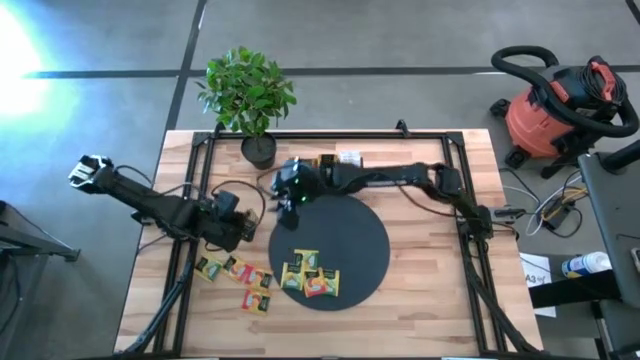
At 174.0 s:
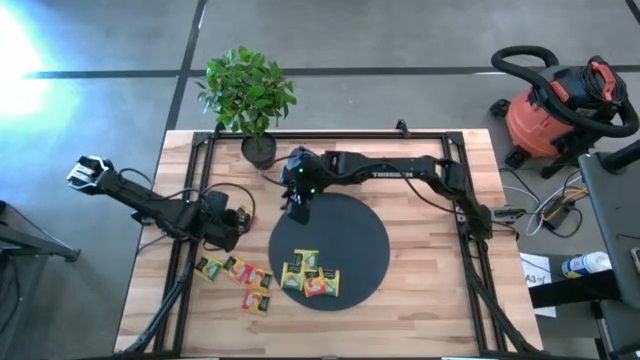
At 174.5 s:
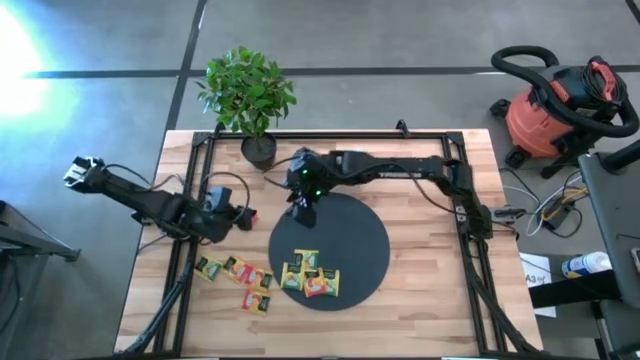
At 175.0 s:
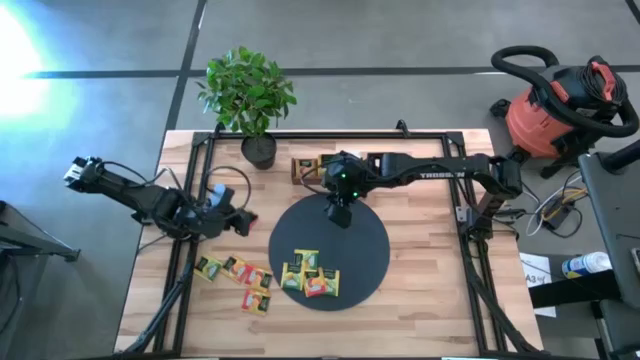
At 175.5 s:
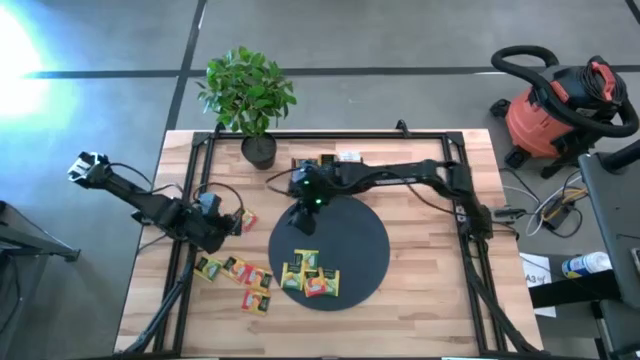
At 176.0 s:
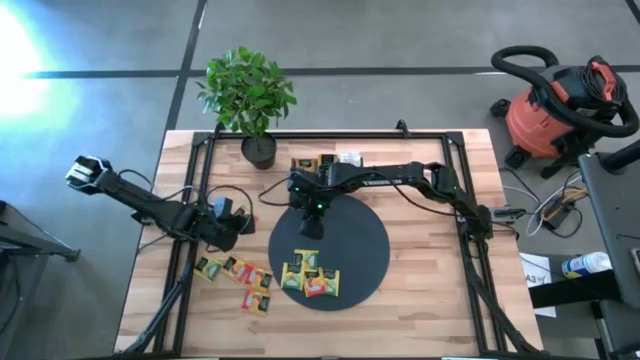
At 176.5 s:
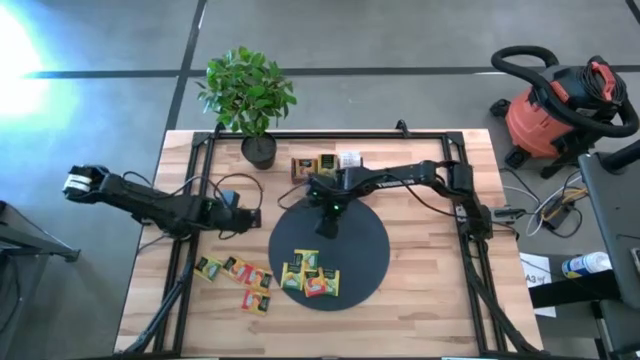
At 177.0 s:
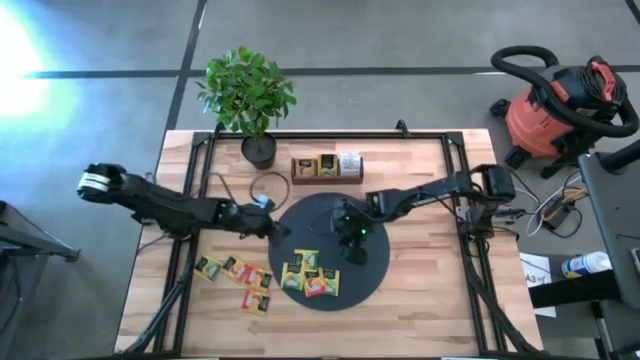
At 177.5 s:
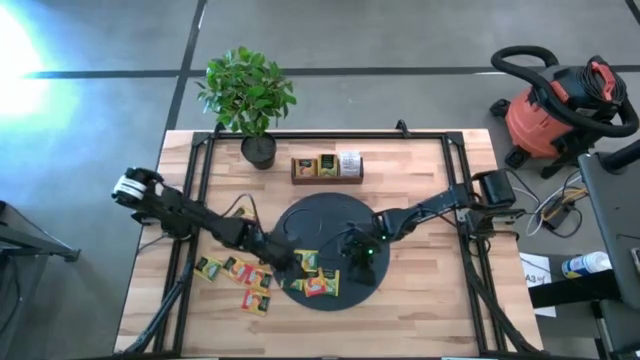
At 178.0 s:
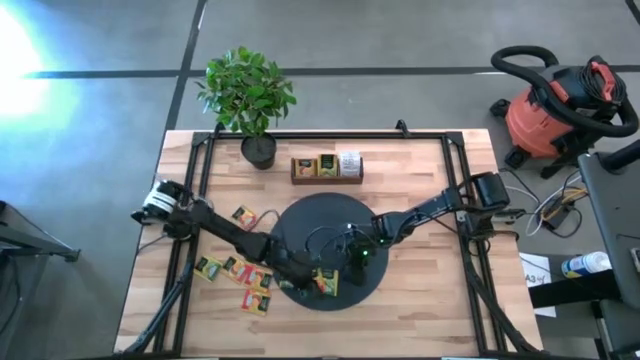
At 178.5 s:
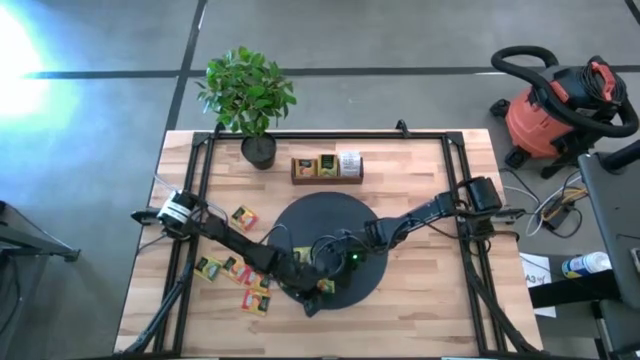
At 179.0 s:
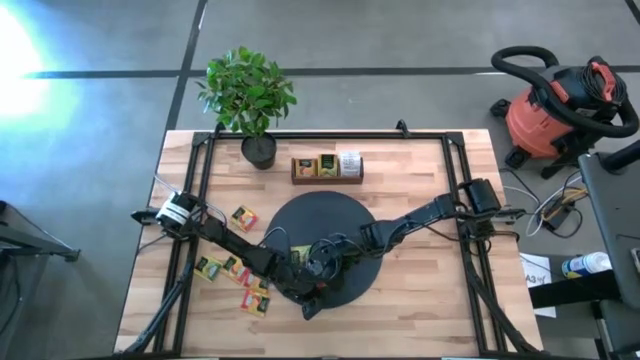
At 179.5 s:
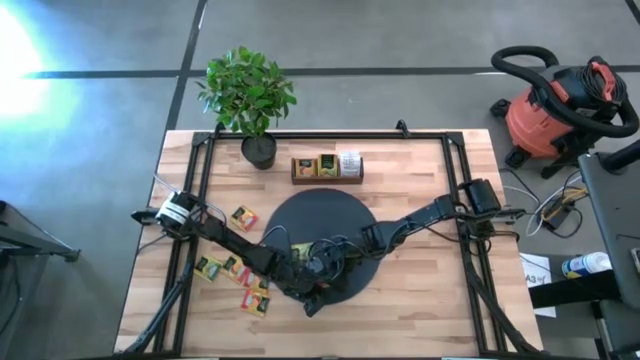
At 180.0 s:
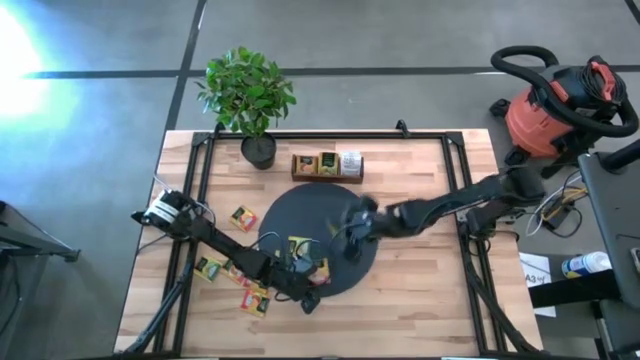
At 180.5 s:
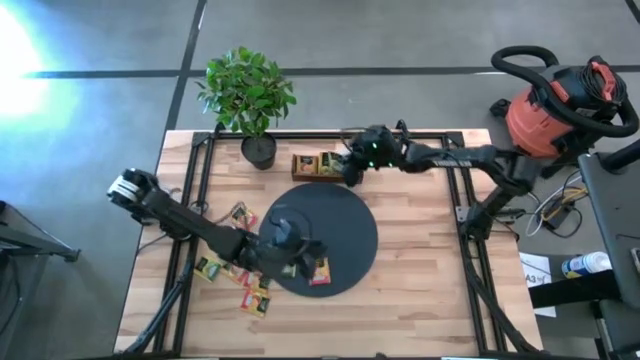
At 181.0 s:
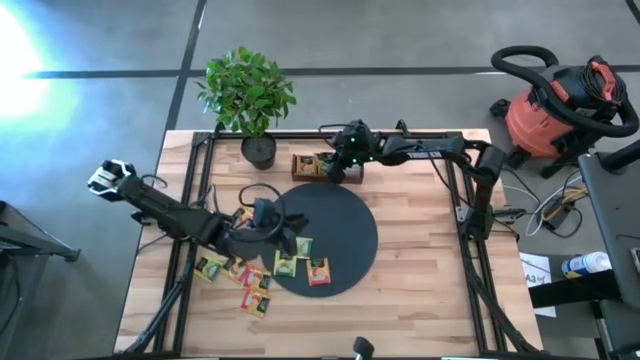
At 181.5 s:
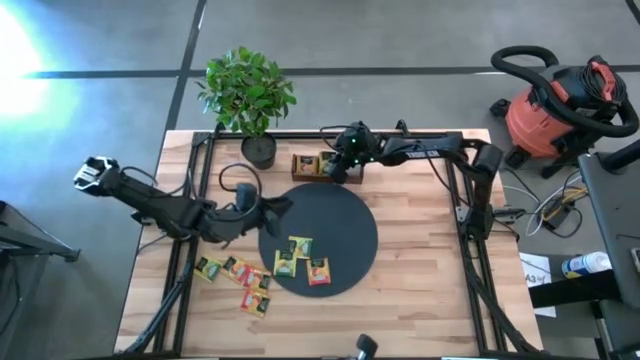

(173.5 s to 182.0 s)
Task: Pick & Place Tea
Put the yellow tea bag into the middle slot of the wooden organizer

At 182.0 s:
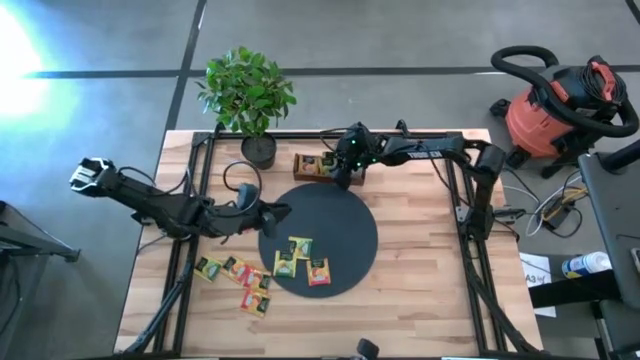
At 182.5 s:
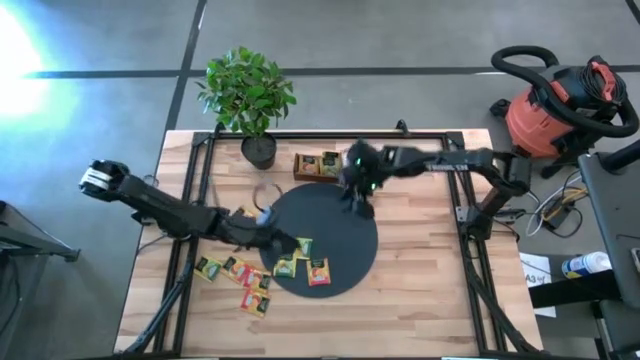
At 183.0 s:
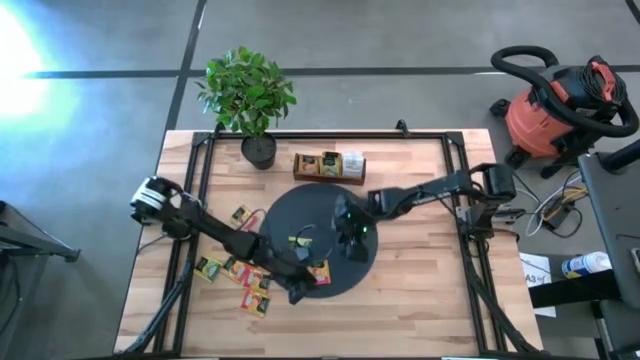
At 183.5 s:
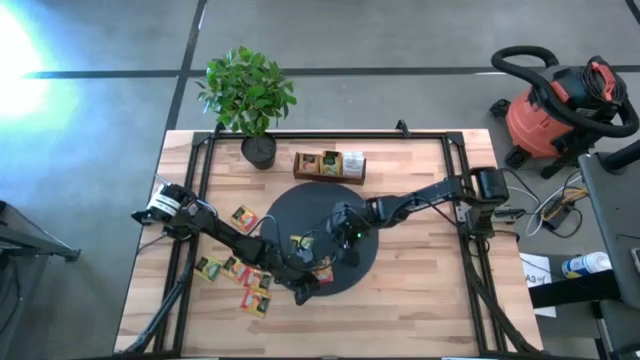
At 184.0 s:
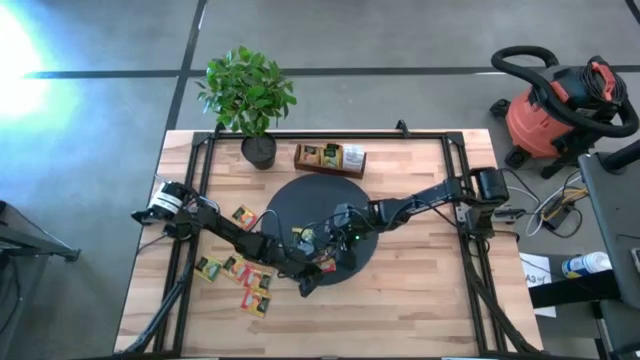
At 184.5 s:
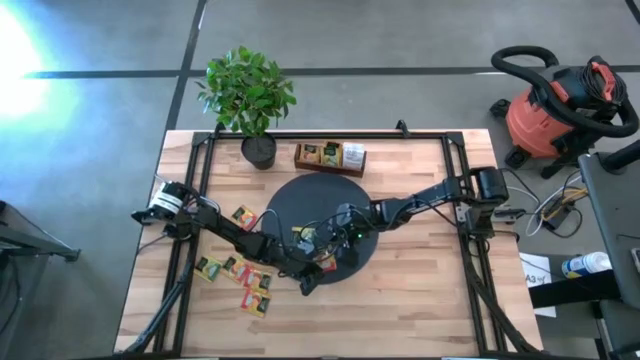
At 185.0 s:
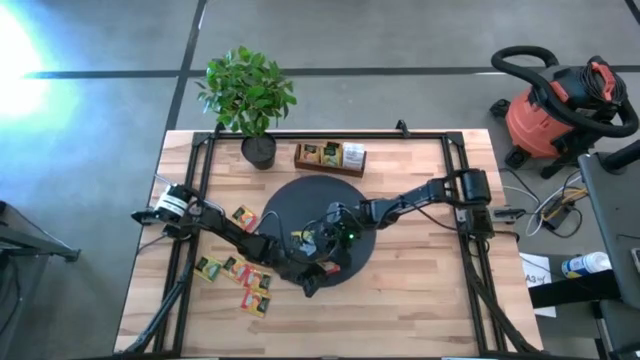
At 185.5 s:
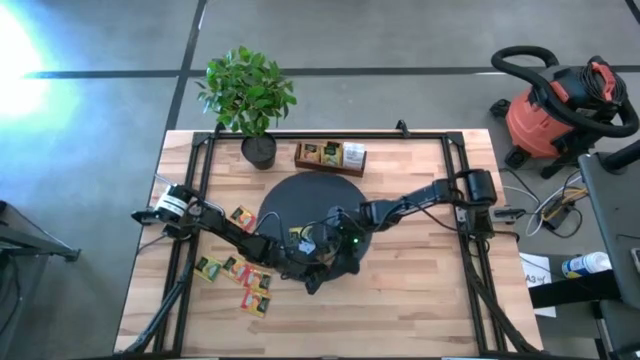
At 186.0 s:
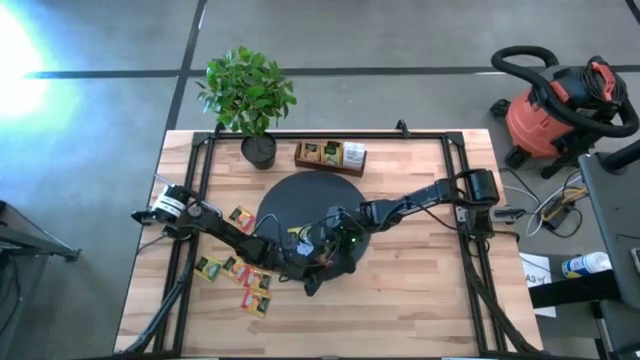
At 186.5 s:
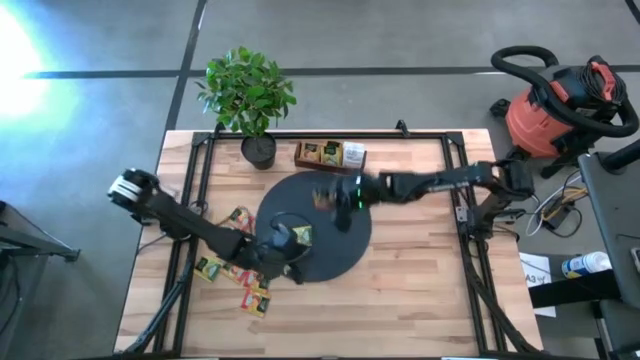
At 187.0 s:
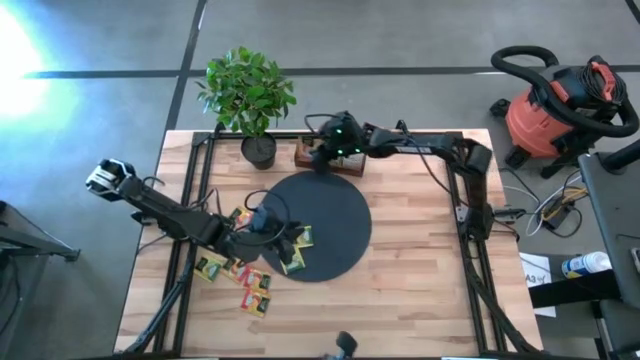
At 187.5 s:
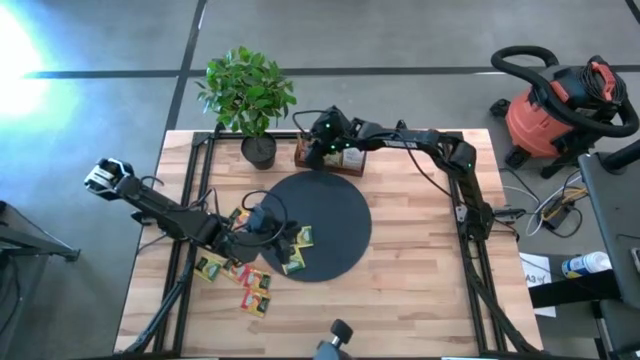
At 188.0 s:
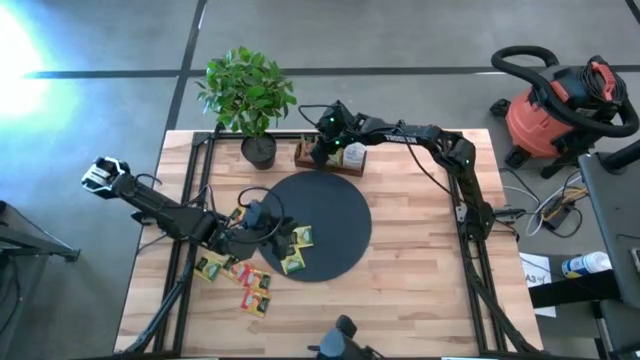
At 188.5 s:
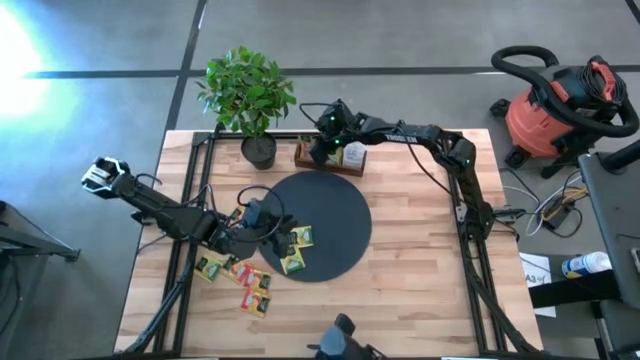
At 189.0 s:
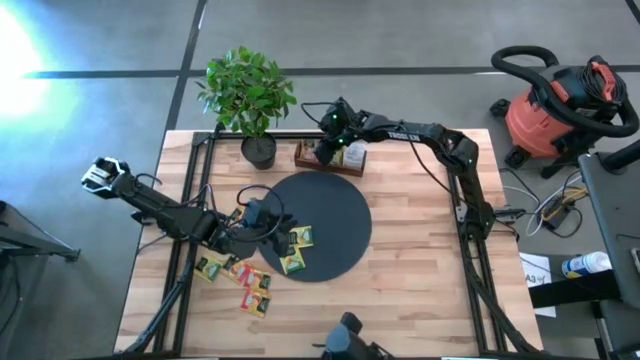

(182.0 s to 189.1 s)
Put the orange tea bag into the left slot of the wooden organizer
